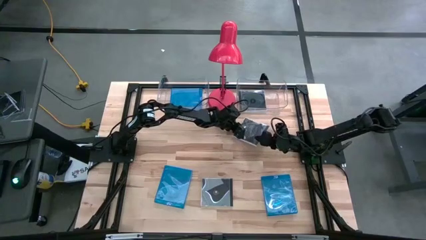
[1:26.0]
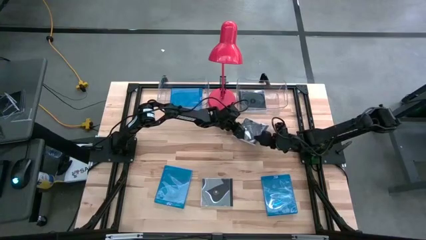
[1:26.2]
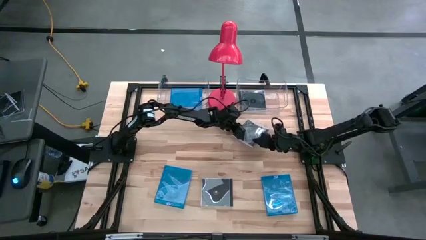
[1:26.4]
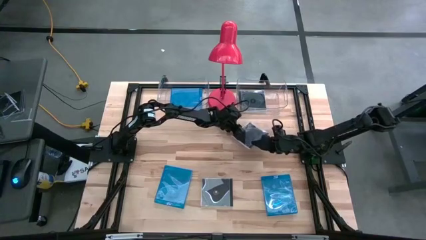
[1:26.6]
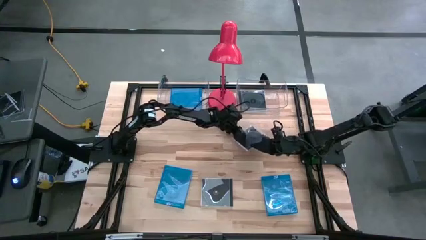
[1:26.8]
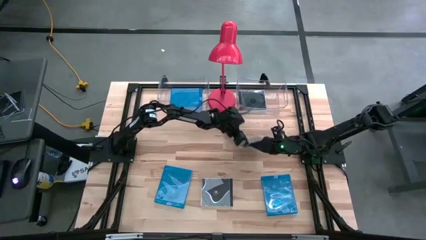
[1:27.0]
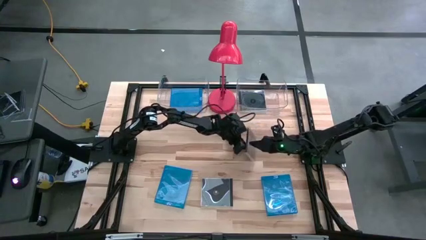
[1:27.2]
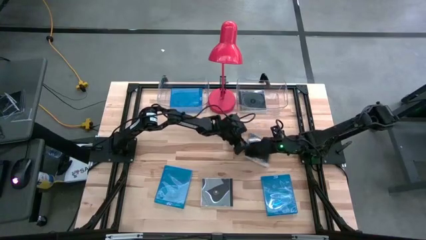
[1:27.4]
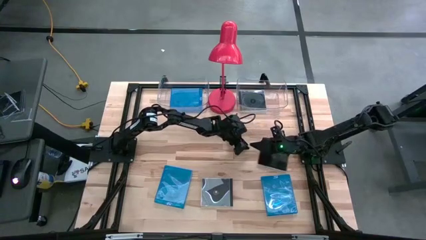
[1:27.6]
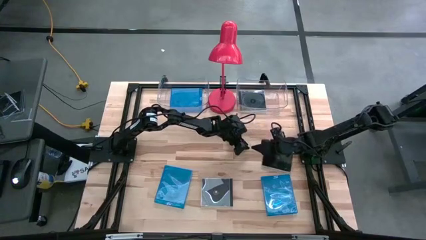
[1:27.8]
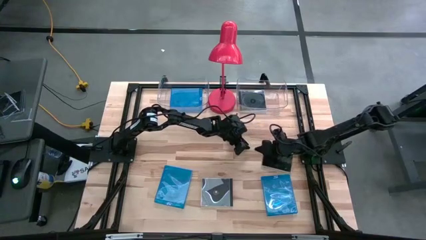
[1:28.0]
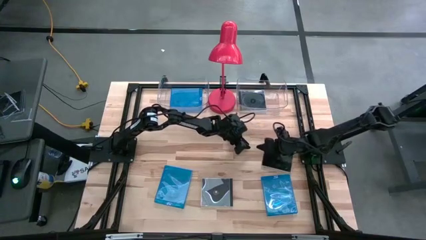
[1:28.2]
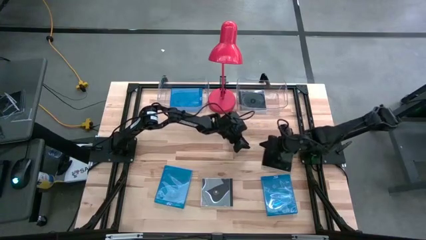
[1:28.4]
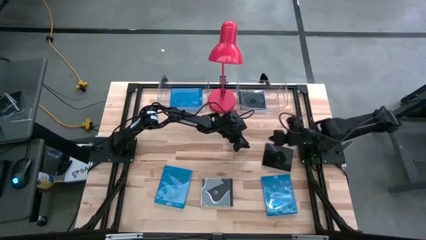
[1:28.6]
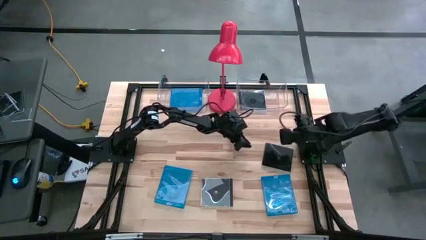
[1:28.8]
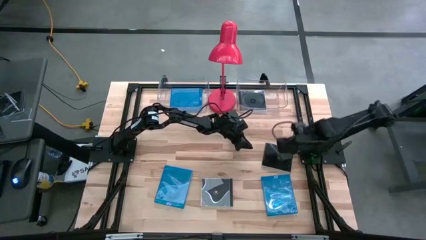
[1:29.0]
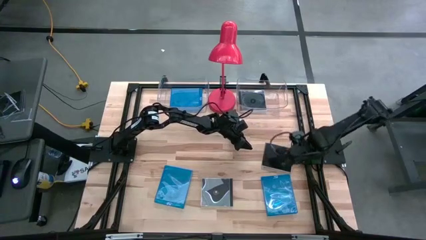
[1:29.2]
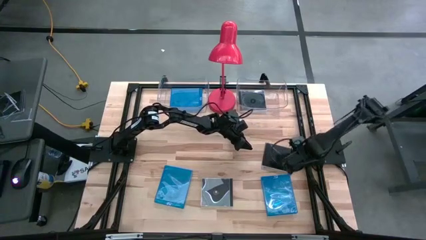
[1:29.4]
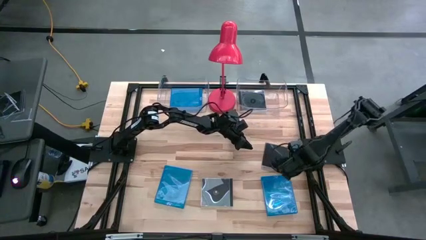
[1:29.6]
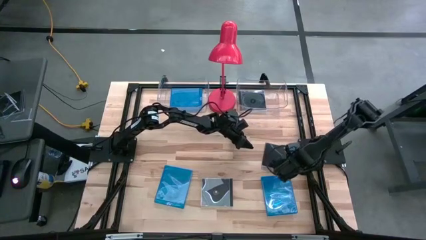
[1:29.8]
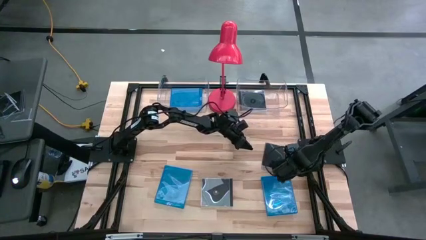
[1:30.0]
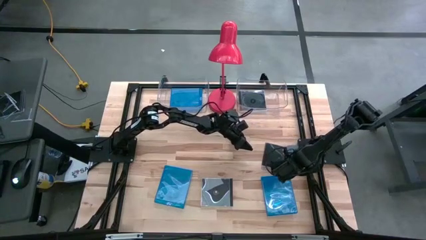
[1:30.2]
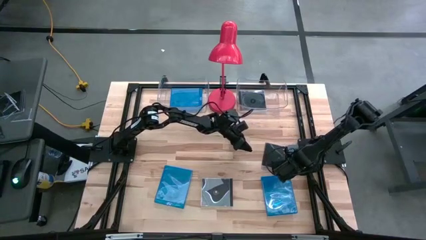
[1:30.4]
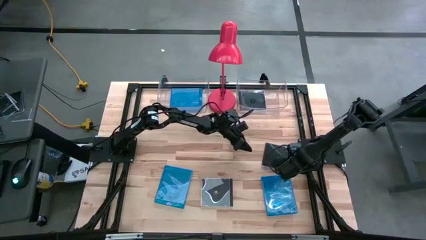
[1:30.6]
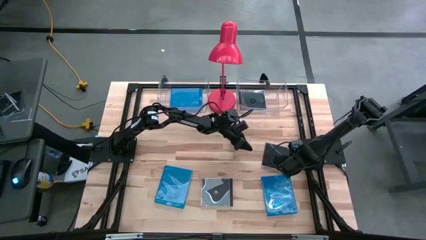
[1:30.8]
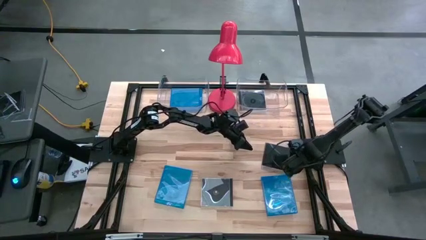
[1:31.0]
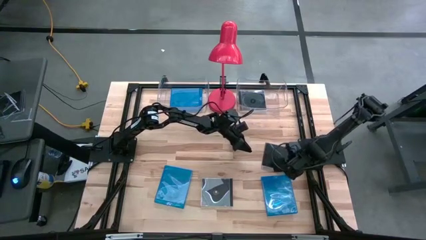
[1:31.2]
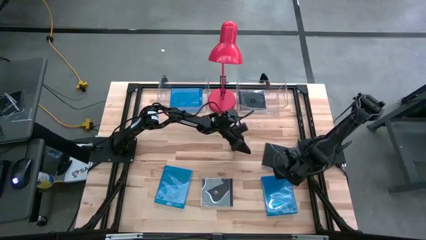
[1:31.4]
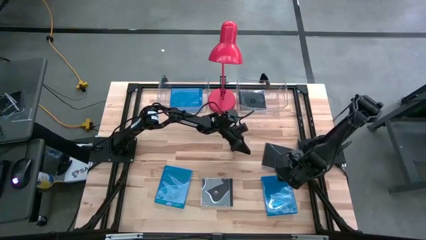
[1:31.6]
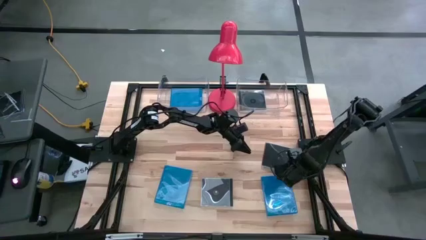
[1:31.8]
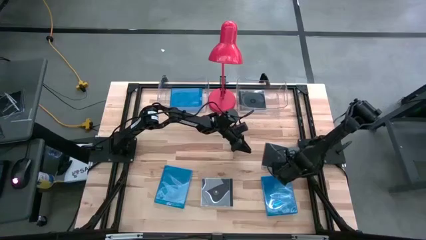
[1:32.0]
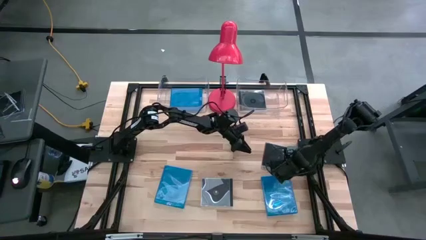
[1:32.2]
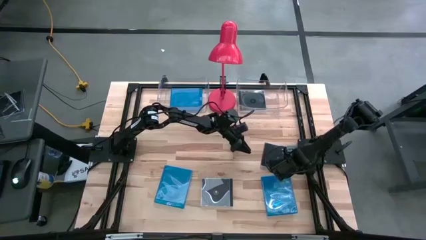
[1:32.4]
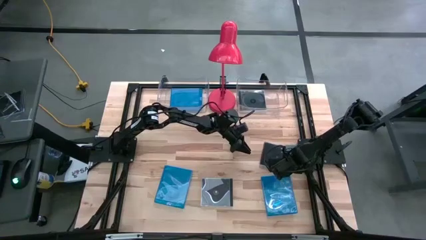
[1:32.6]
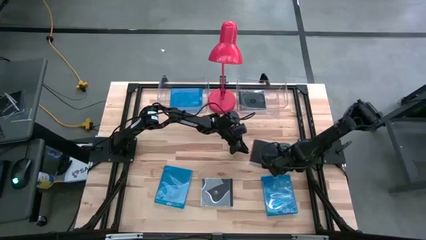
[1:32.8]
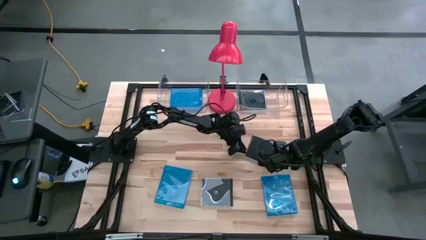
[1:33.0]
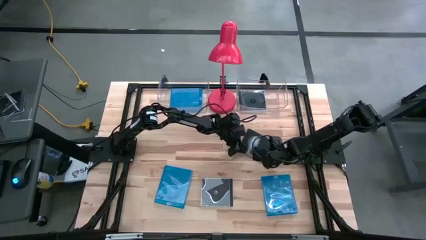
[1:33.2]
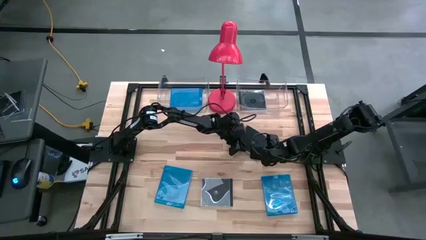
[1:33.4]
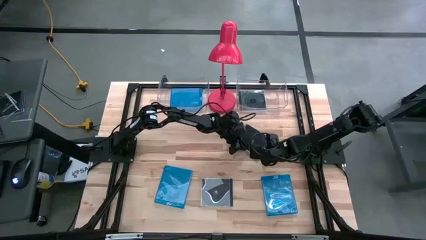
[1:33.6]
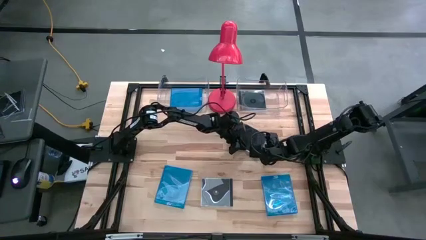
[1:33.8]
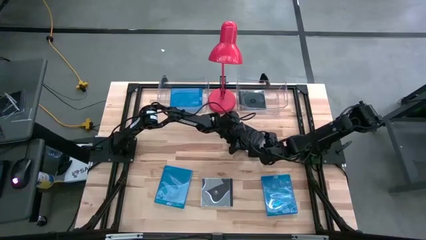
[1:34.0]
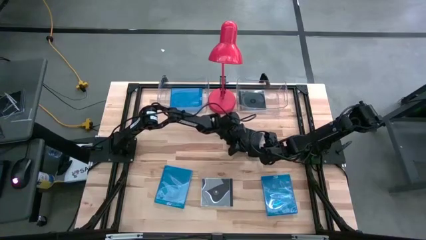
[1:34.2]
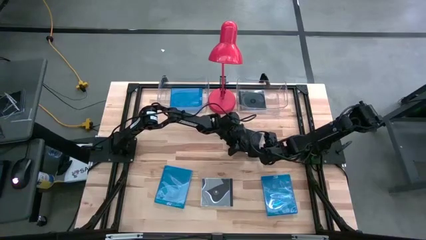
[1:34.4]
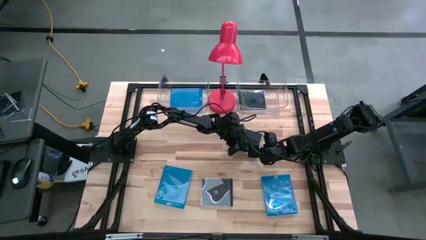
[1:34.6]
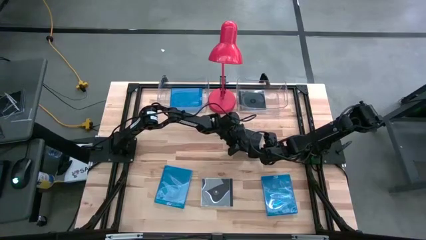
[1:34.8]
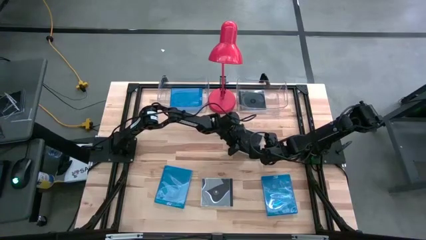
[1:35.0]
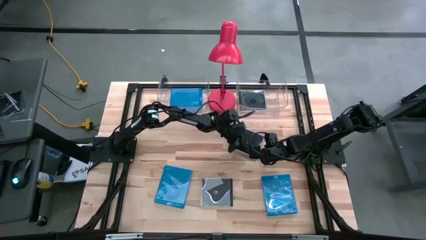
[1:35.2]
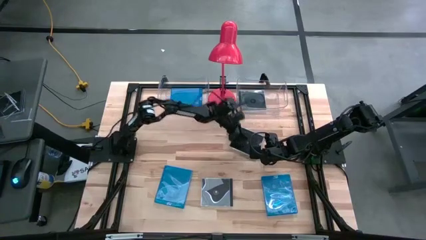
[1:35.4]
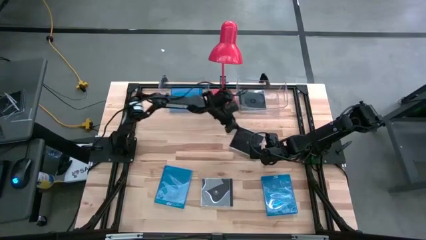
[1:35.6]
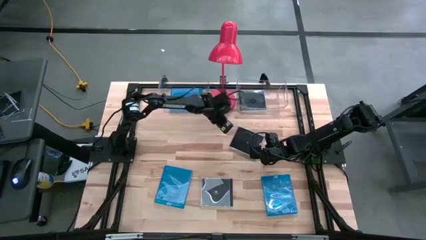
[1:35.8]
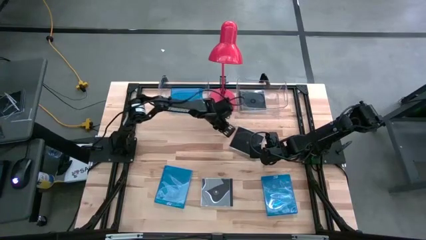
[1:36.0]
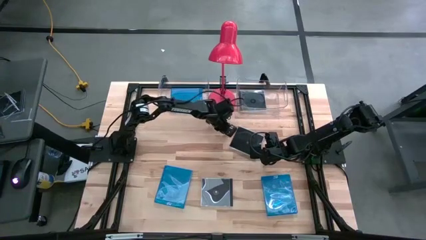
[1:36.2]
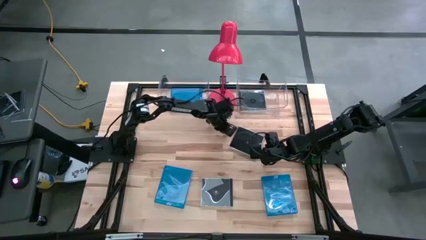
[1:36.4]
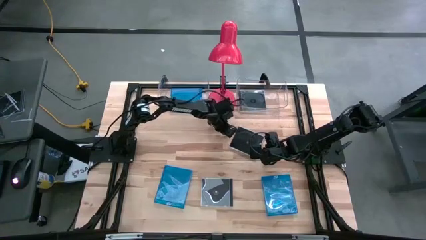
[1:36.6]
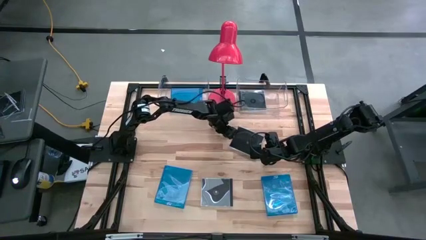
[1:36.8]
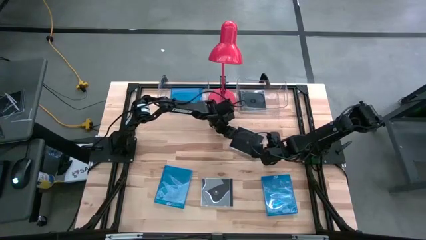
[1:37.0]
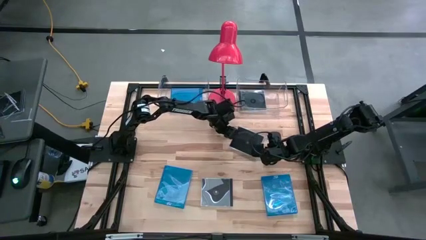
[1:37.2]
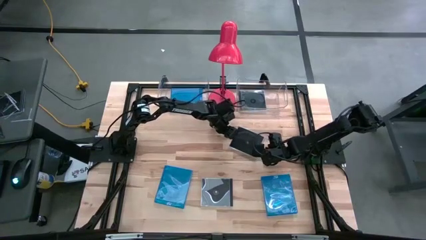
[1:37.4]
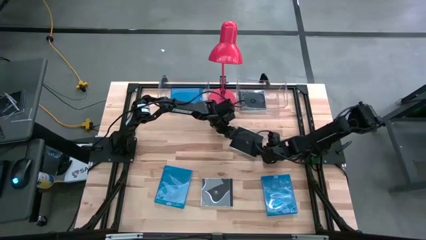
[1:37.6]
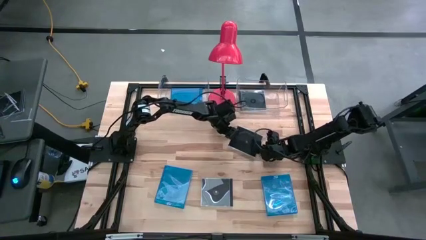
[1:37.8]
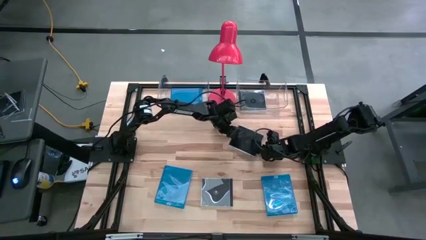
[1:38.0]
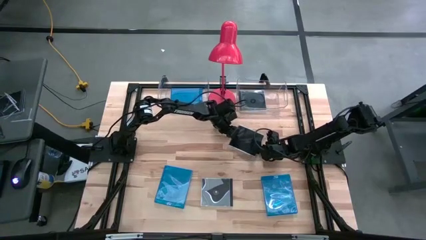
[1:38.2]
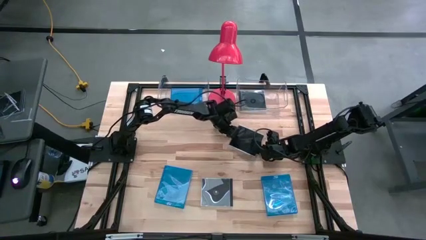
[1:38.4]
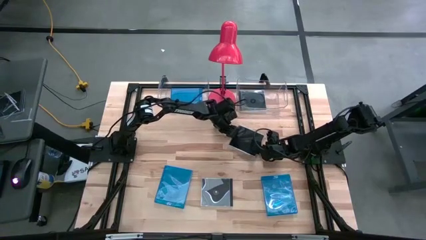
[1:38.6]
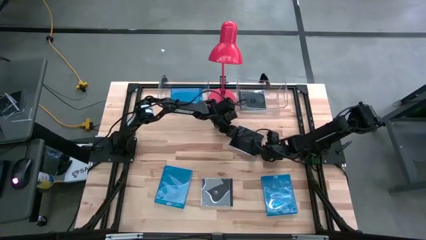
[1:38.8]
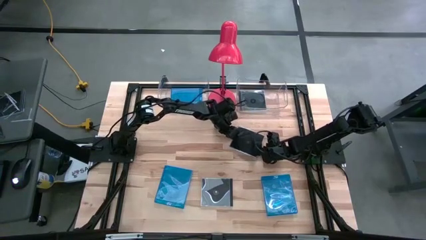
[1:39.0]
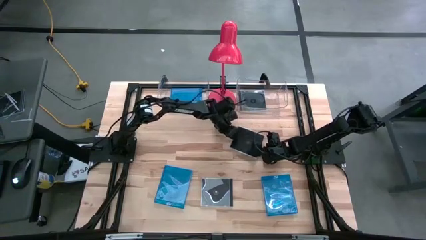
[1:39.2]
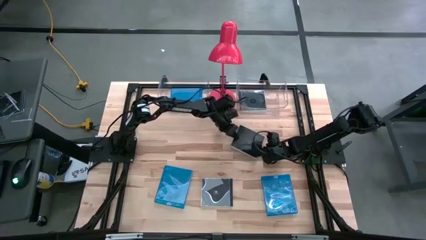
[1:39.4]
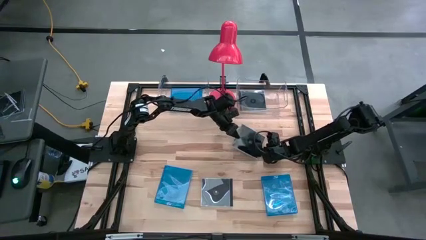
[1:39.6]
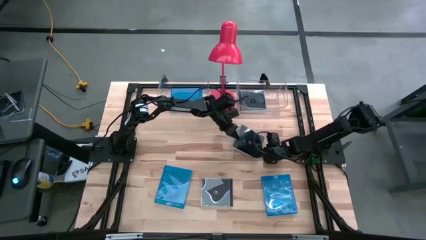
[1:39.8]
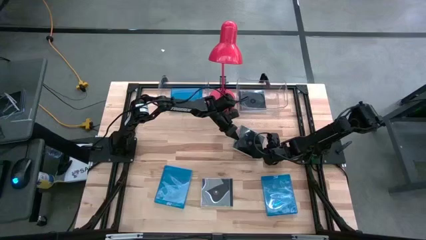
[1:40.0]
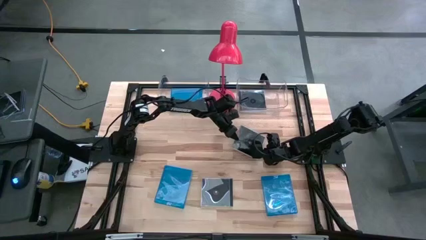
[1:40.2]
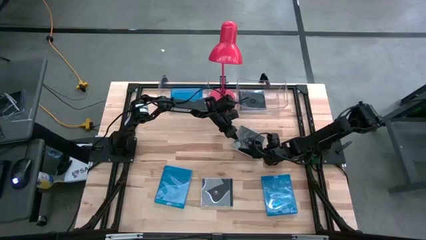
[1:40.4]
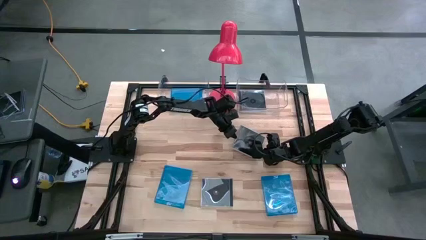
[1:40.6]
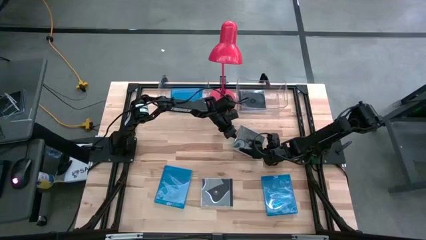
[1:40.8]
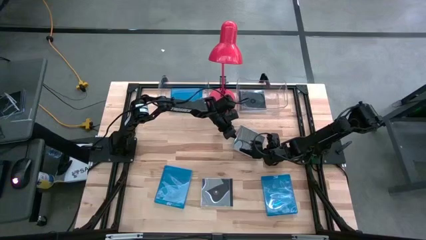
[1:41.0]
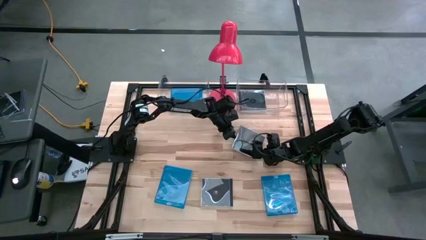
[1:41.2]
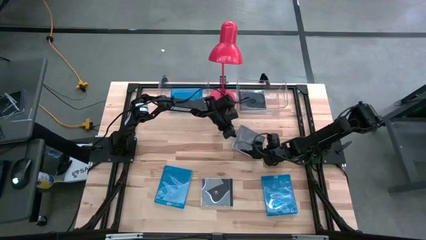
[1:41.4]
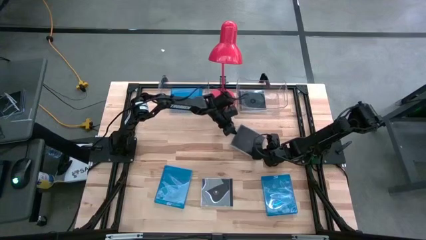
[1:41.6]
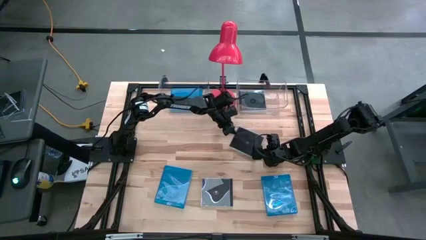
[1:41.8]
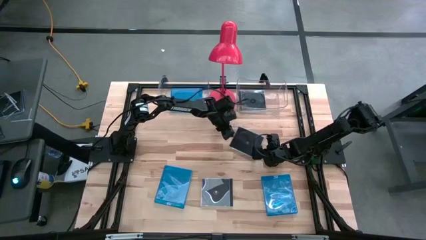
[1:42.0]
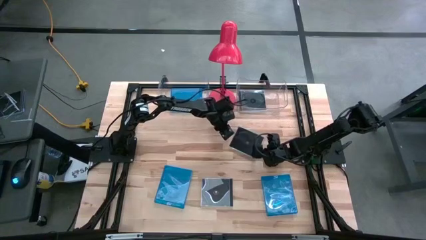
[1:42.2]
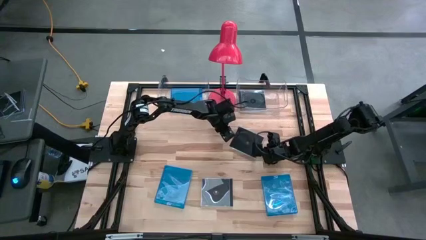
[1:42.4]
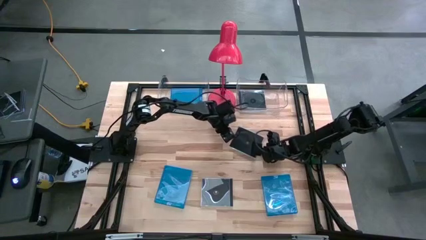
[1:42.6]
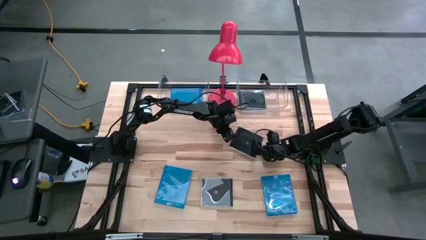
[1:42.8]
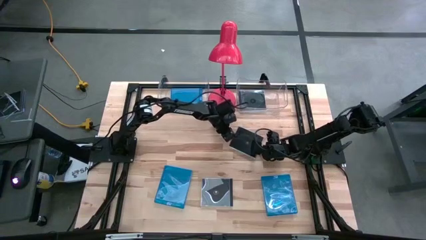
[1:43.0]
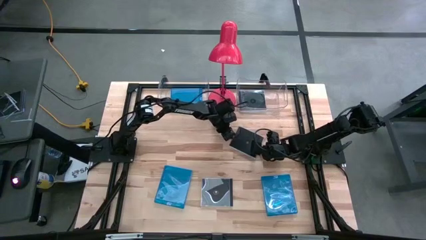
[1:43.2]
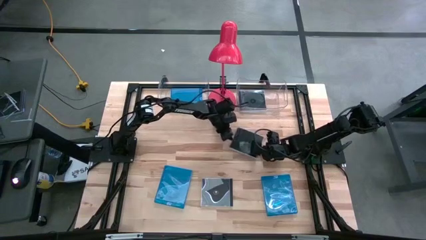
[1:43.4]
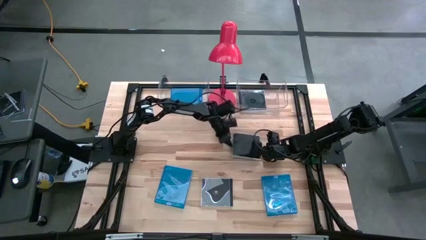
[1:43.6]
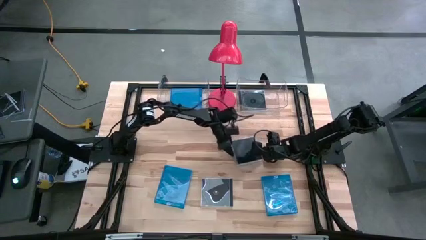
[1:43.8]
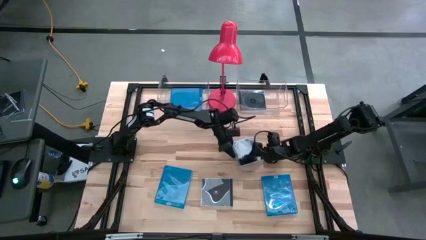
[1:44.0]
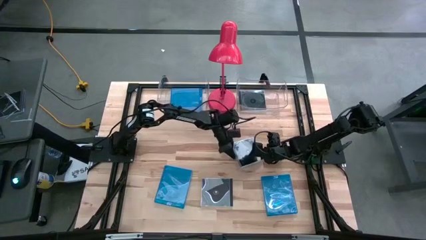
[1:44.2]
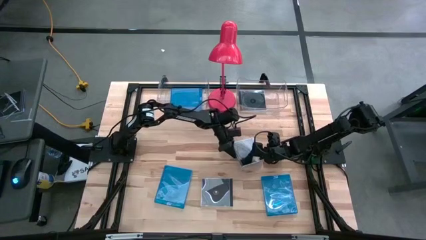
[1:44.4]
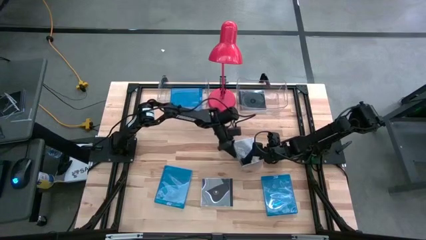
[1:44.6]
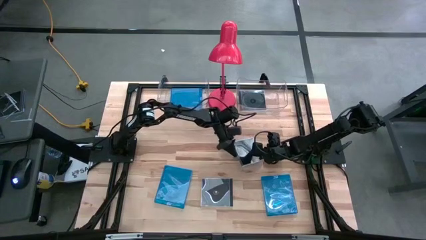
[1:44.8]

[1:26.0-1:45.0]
Task: Pick & place jewel cases by type
Put the right black cd case into the right transparent bin
